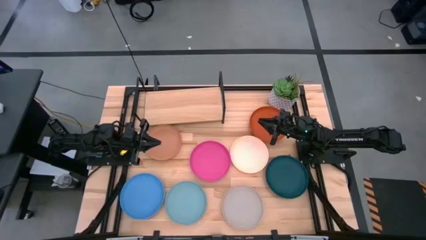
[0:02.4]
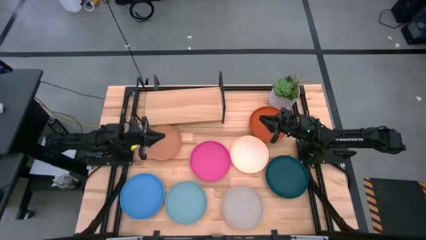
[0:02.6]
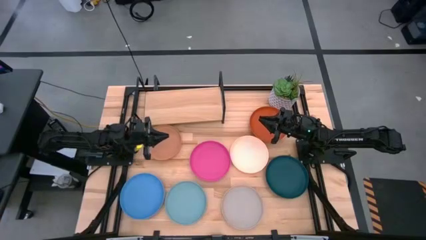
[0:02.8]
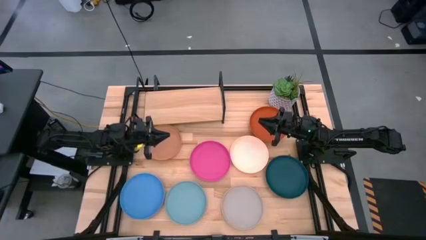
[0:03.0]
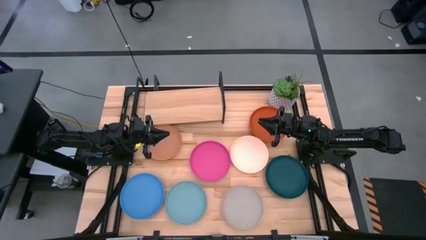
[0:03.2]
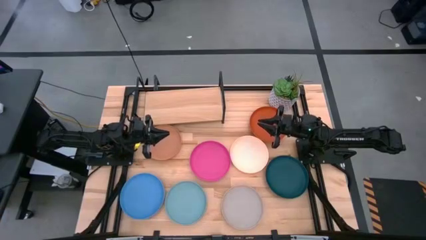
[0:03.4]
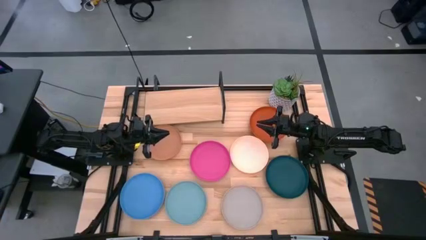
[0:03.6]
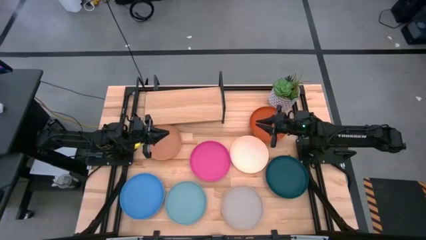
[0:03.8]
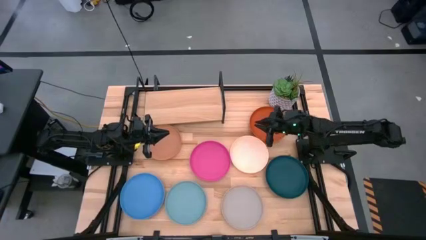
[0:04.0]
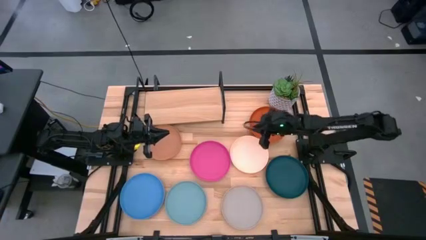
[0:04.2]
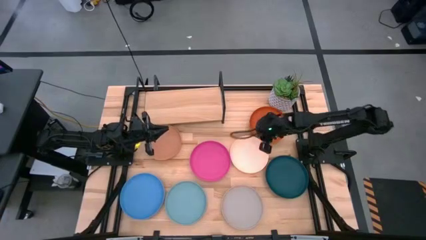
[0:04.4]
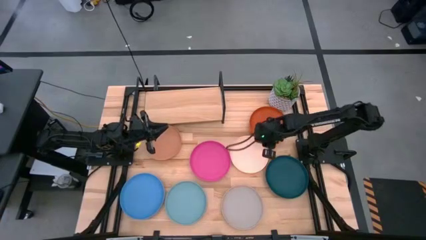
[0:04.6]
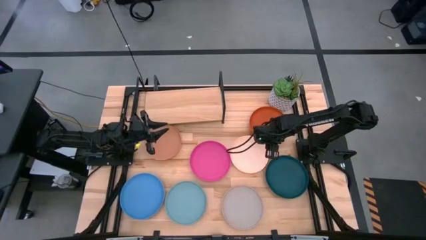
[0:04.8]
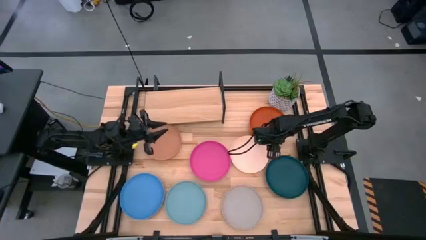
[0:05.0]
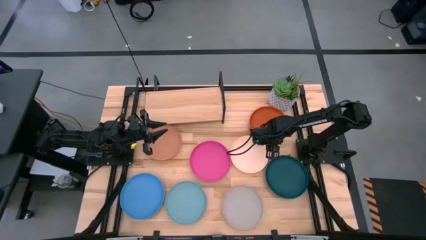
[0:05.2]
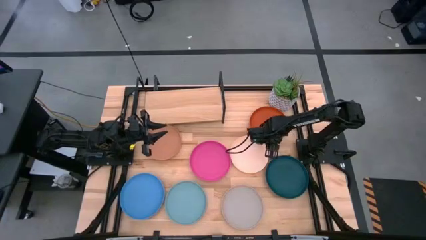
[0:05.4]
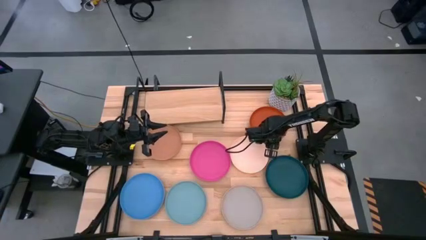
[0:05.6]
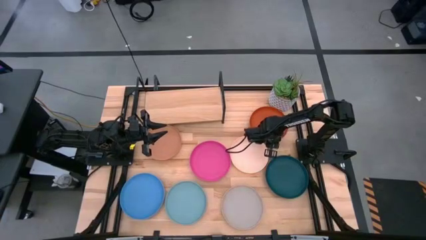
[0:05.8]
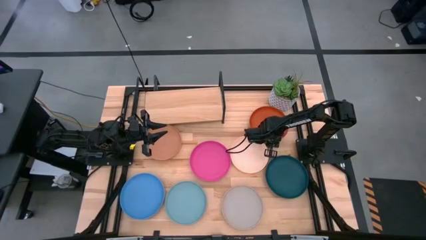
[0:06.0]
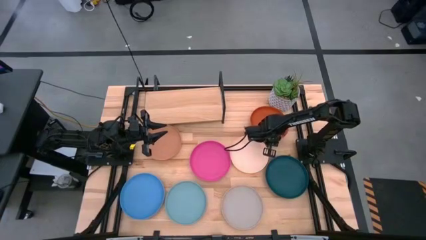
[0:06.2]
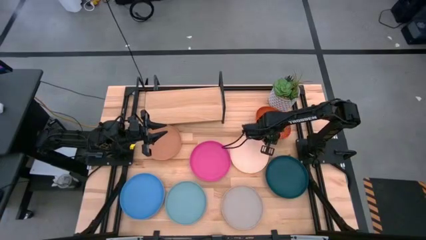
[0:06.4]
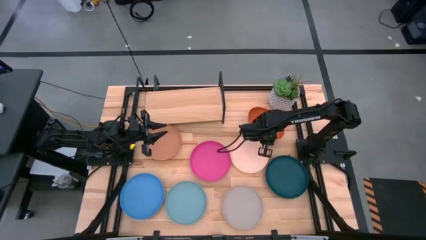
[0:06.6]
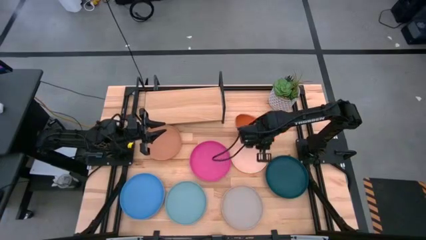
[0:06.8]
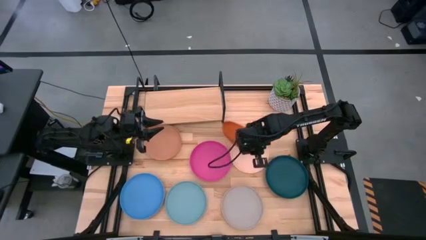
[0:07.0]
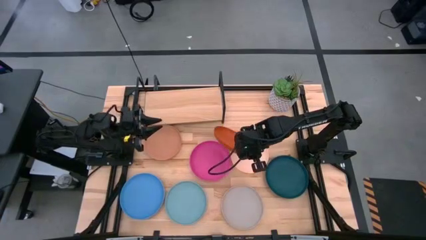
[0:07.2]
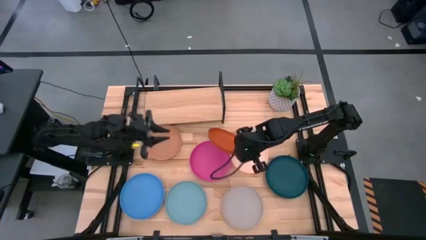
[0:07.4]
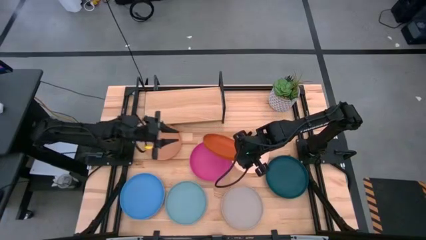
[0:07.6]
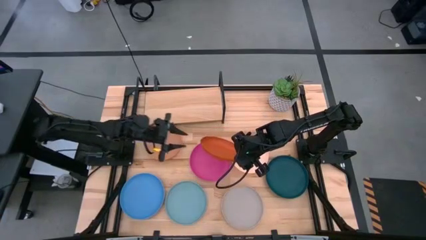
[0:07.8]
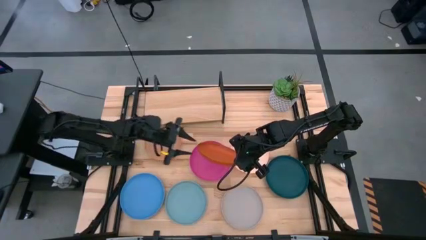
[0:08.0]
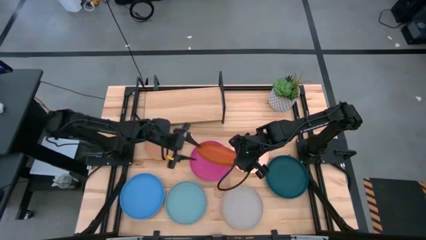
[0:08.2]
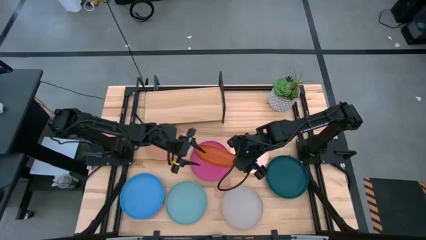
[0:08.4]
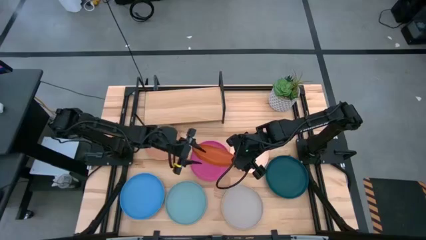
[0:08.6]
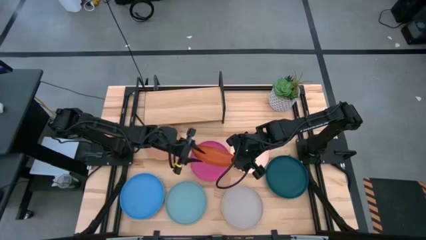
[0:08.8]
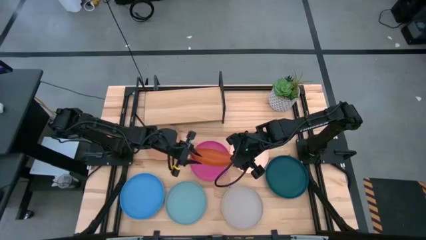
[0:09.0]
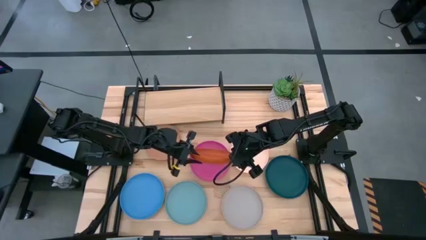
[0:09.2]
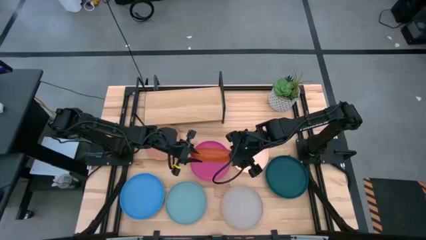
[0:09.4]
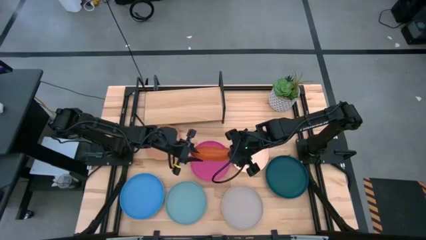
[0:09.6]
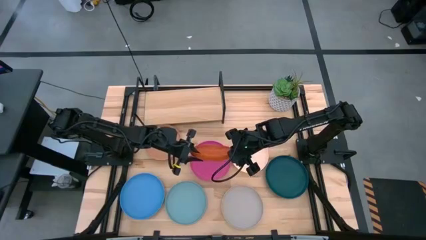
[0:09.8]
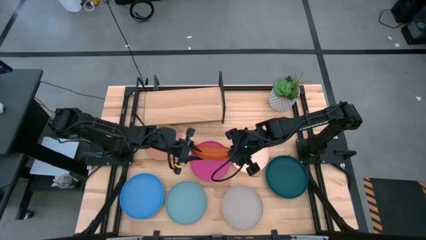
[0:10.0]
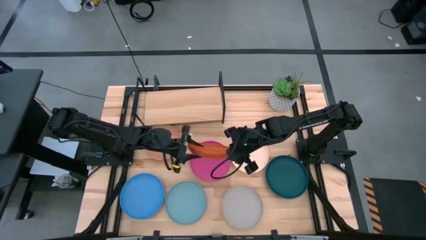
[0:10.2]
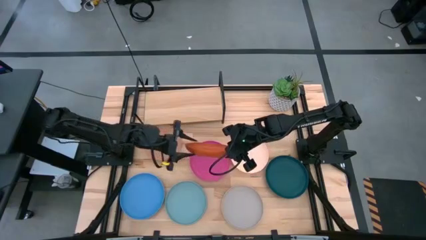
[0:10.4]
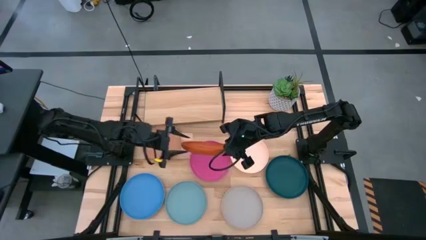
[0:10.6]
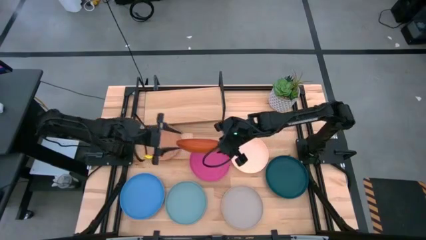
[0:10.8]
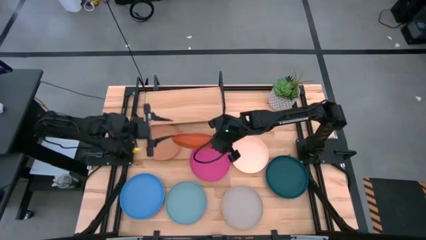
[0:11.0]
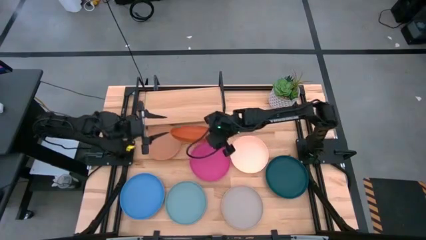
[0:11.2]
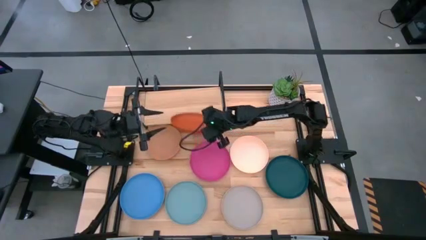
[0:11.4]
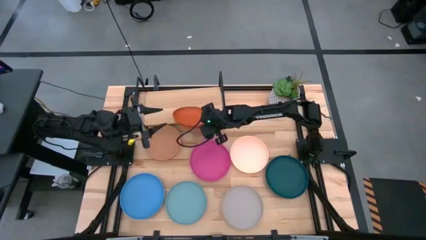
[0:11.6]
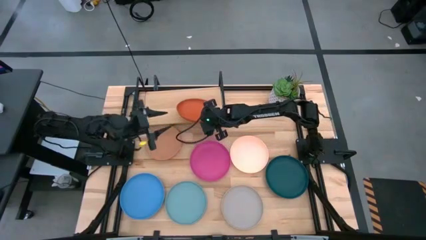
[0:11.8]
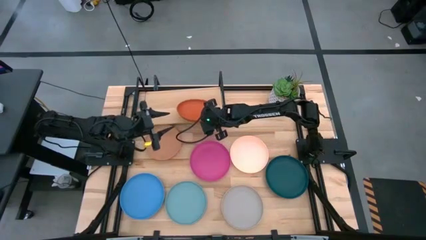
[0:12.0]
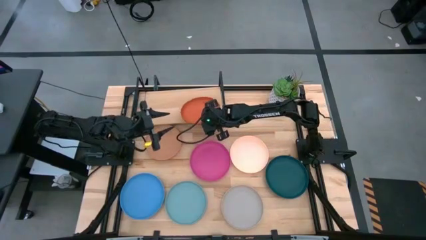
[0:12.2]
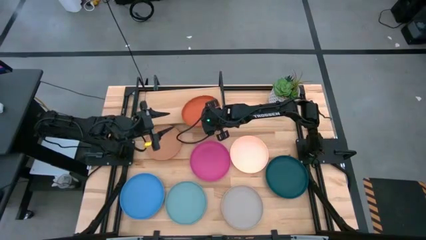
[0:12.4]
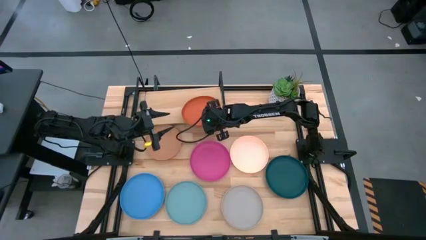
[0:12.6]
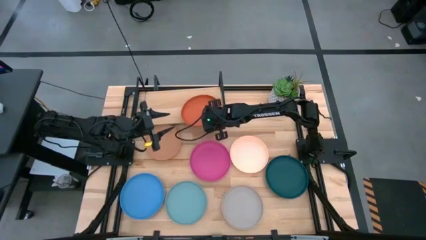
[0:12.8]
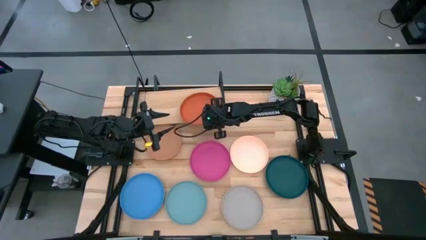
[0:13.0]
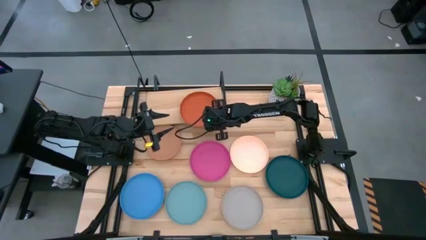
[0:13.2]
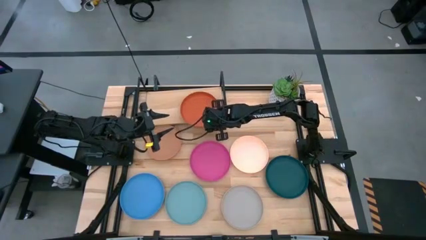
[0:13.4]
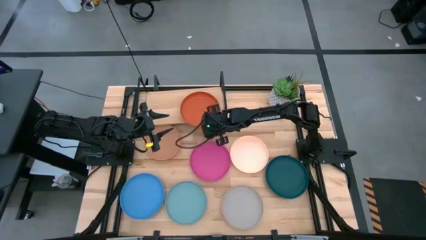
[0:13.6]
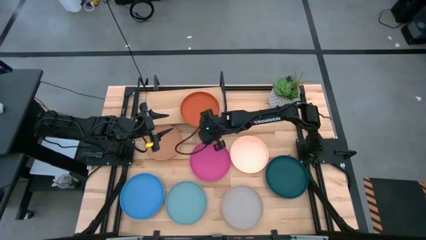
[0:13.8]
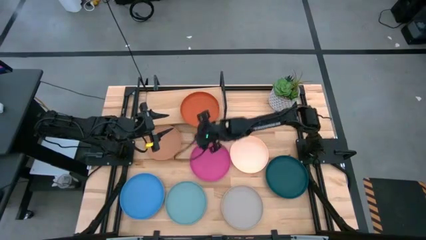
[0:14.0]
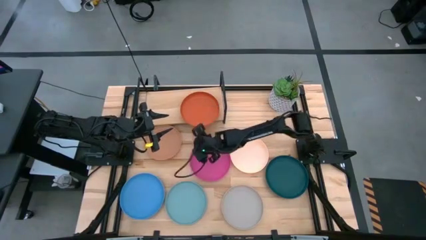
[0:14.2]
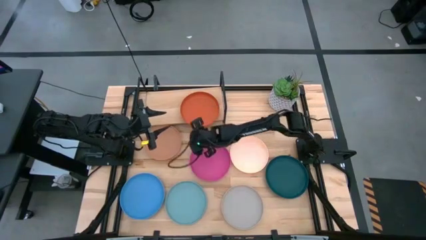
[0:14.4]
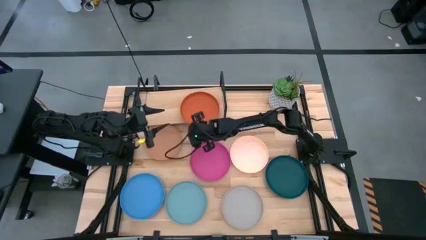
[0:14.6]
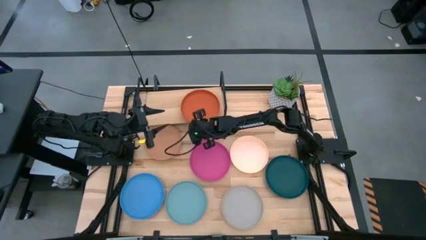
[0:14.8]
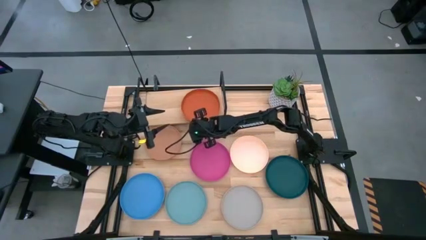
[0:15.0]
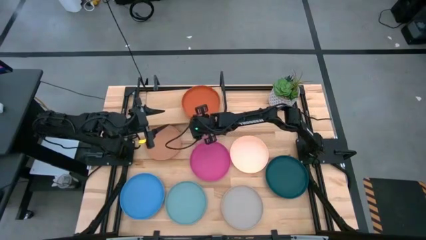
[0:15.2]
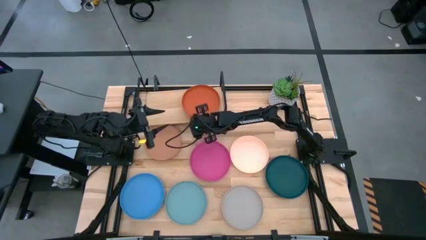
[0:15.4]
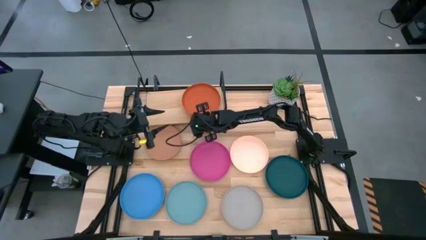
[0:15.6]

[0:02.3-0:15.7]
Task: Place and stack plates onto a shelf
Put the orange plate on the shelf
